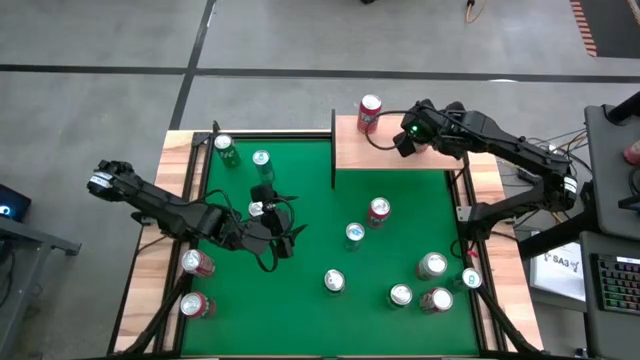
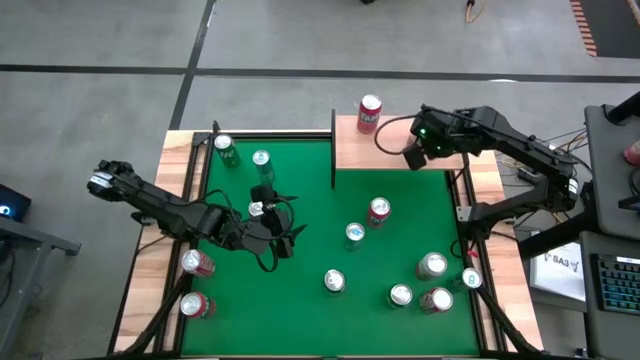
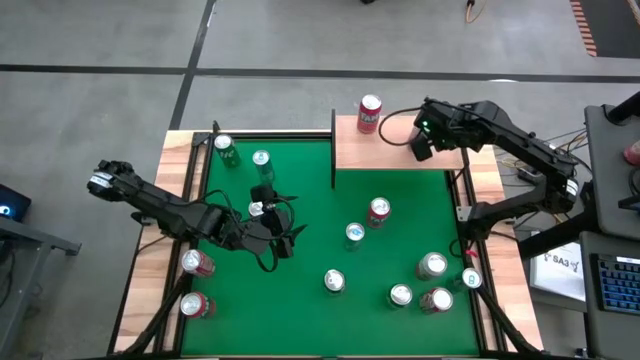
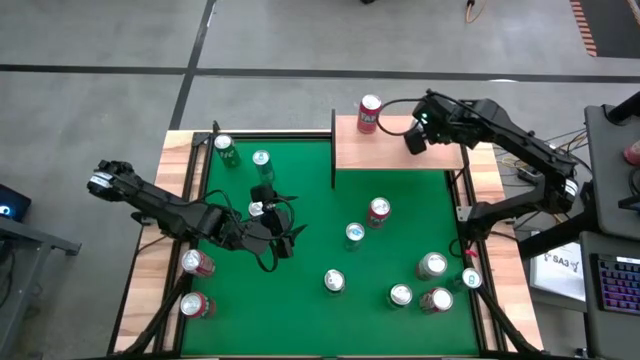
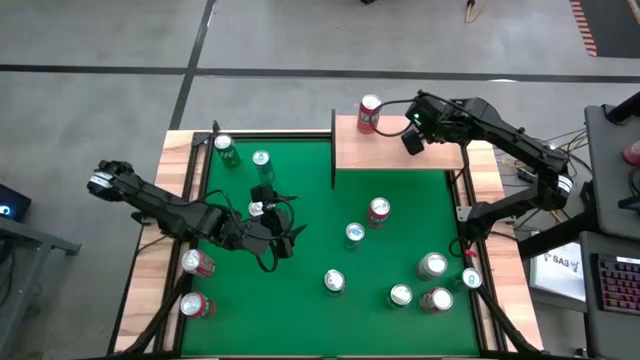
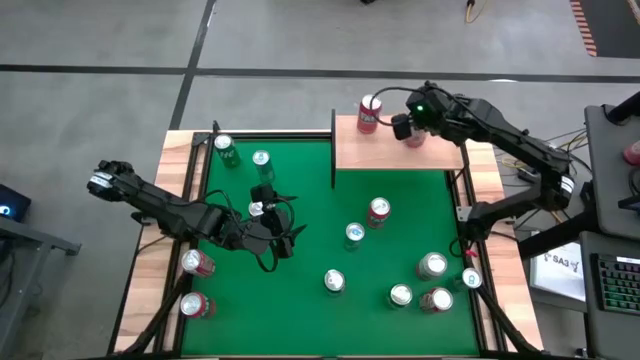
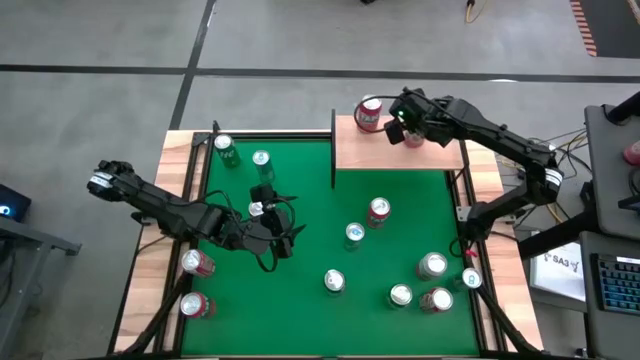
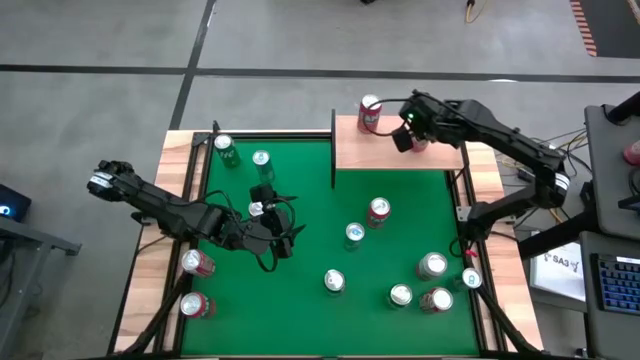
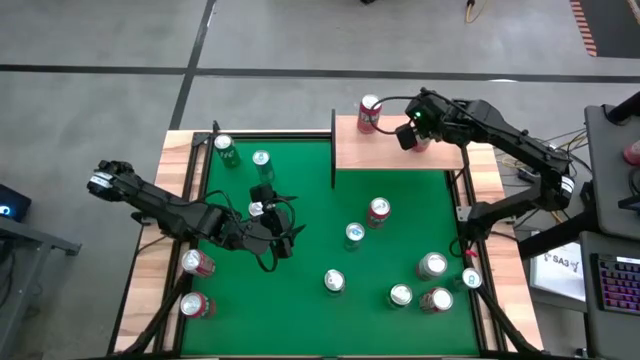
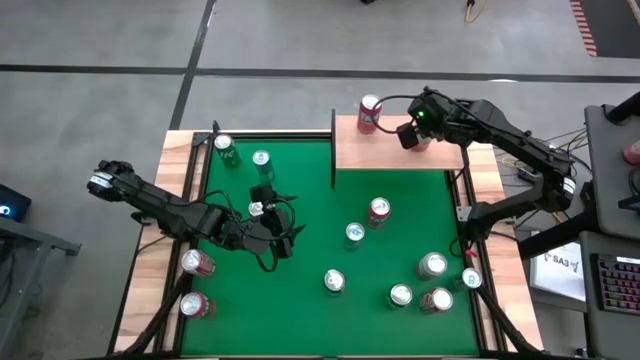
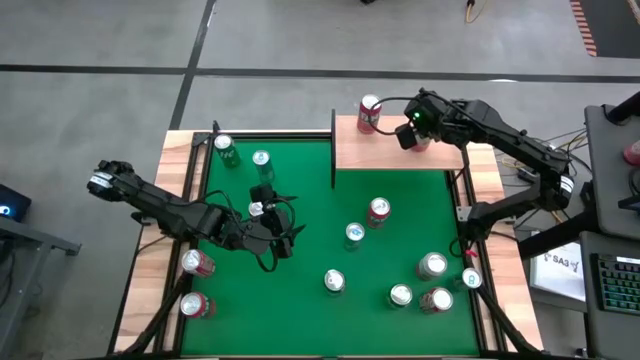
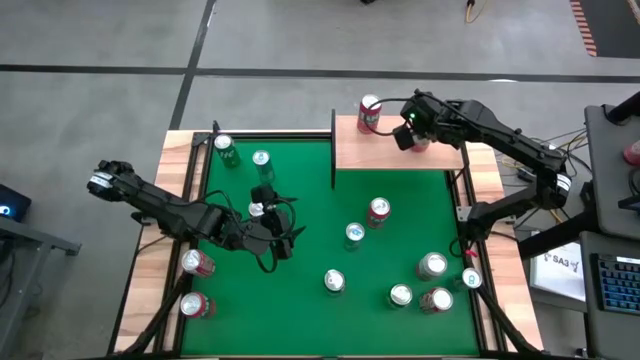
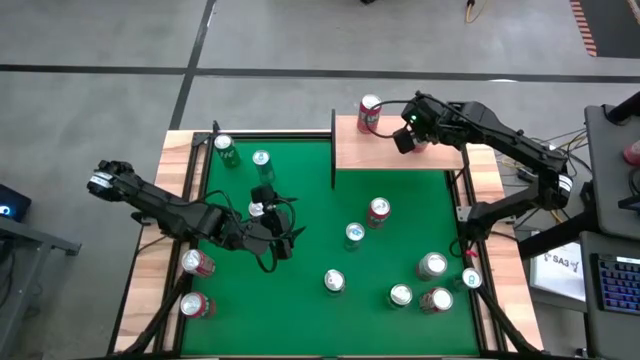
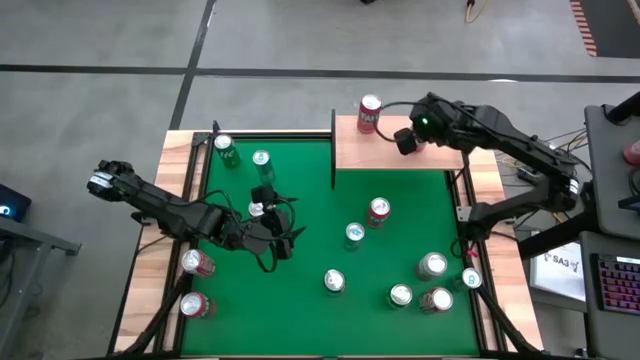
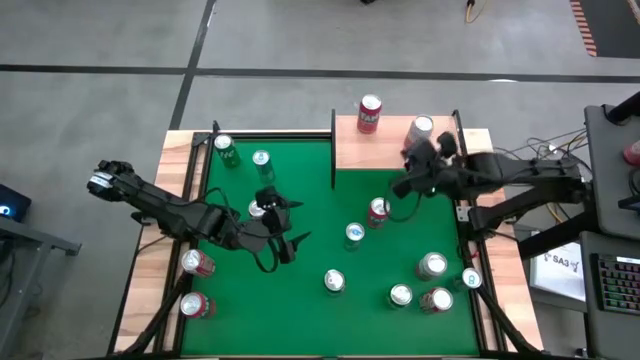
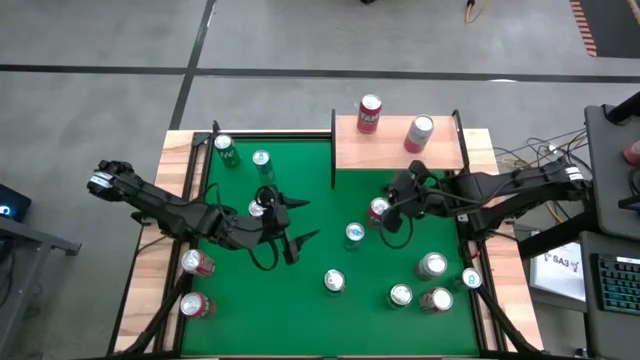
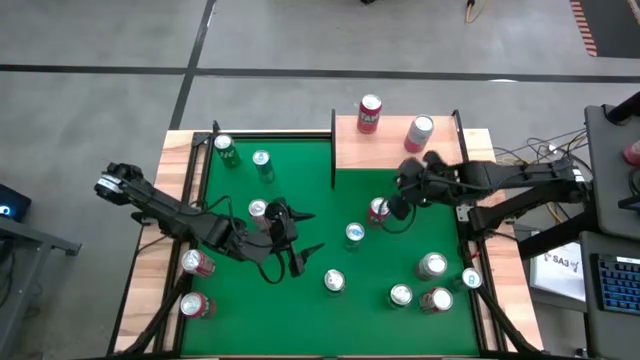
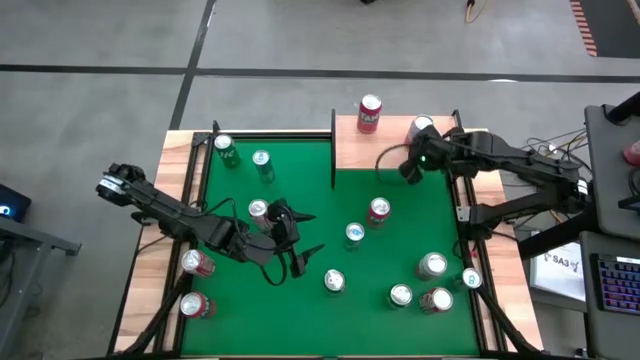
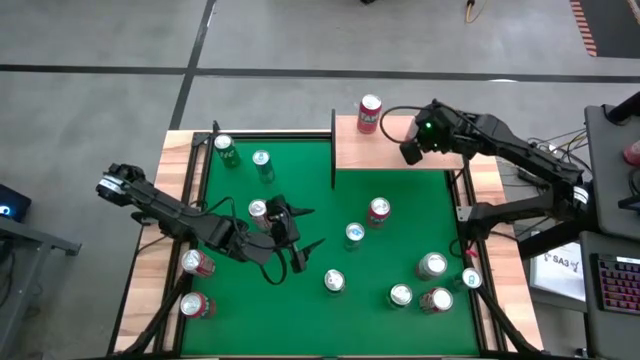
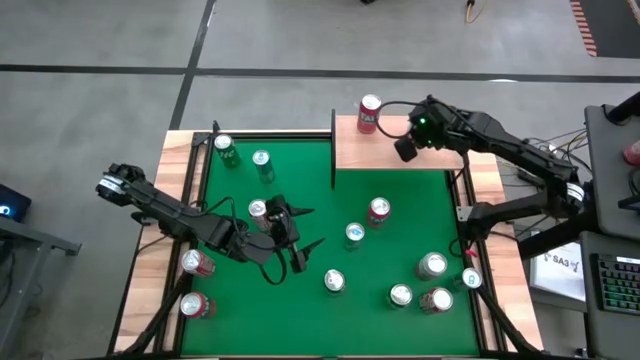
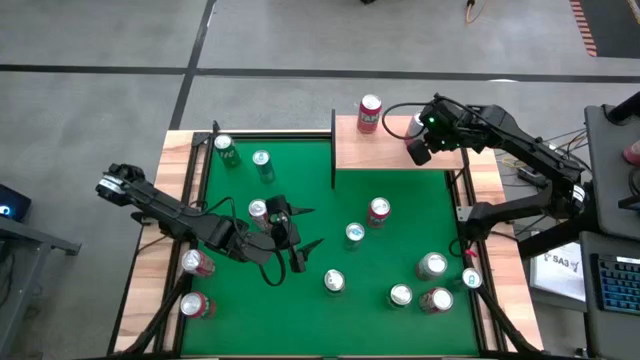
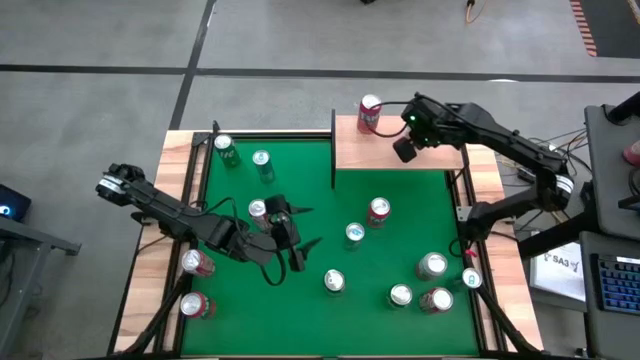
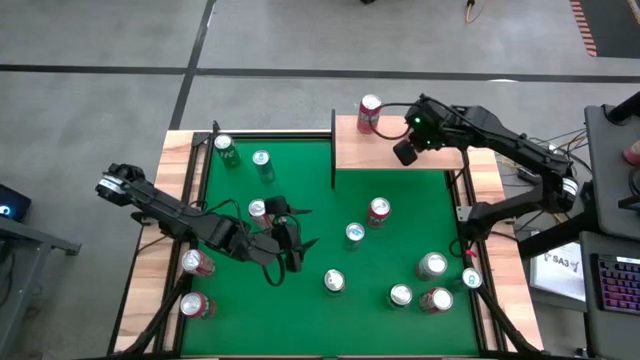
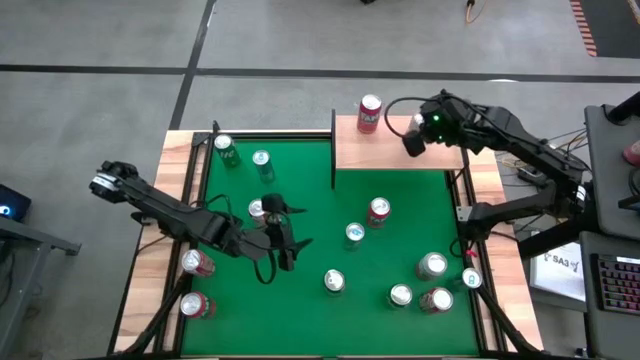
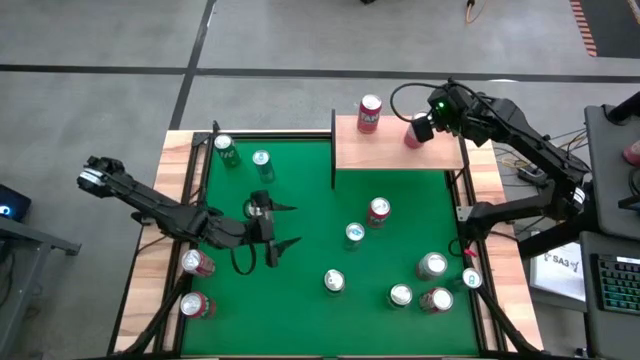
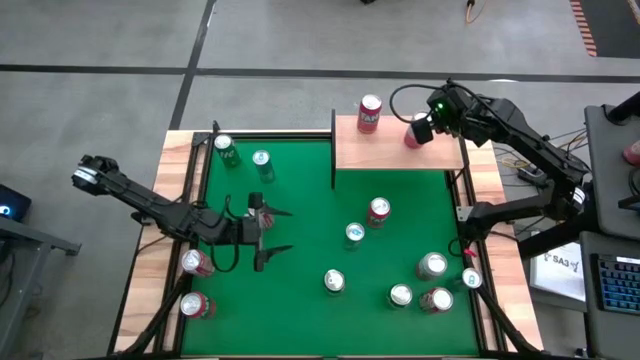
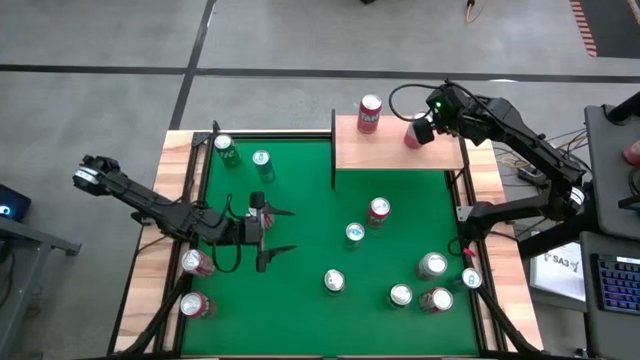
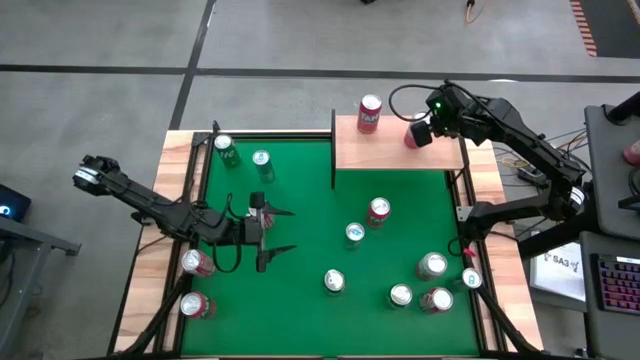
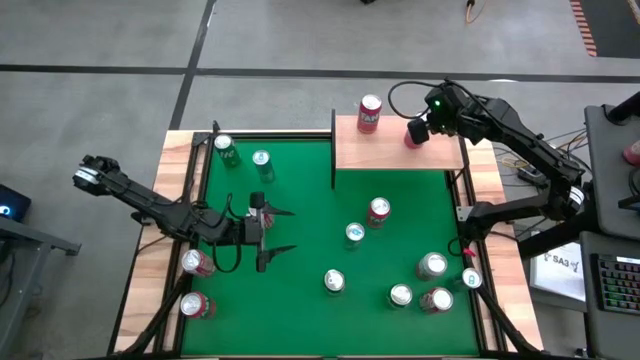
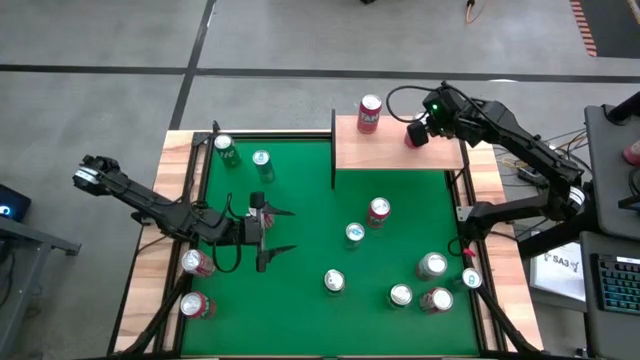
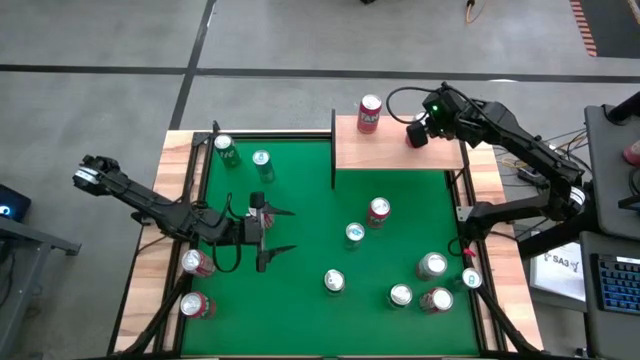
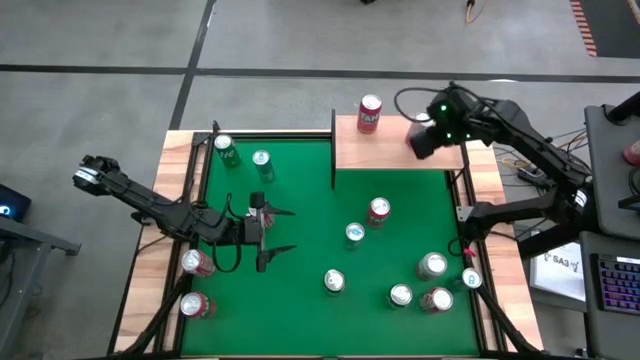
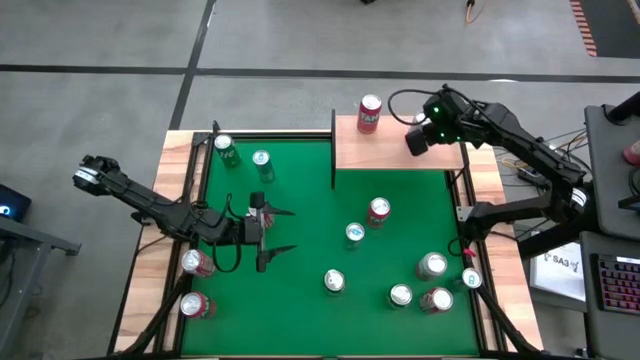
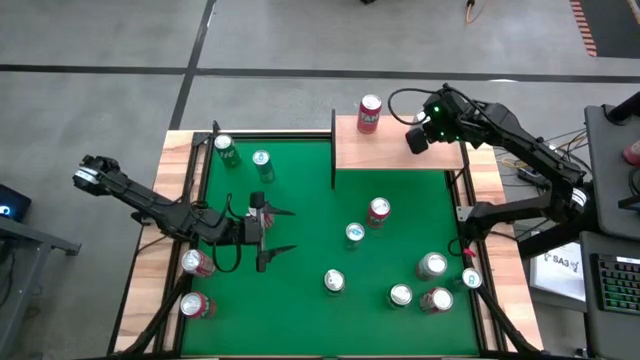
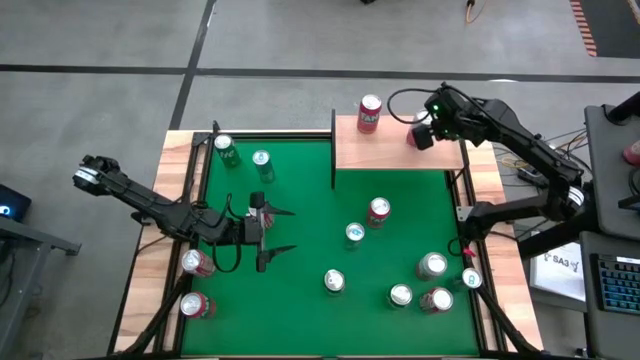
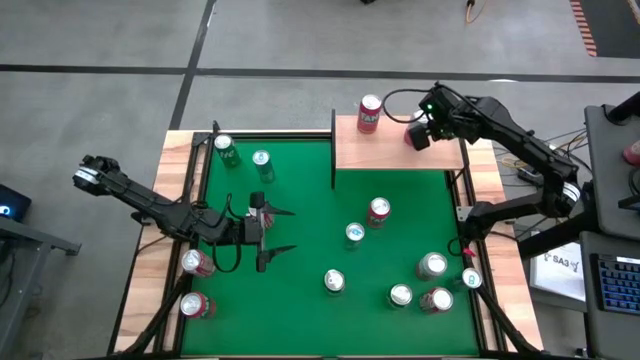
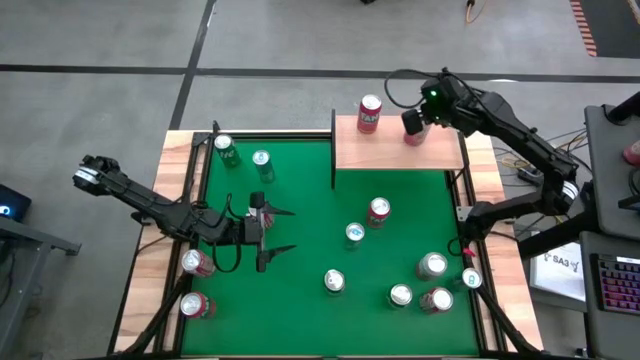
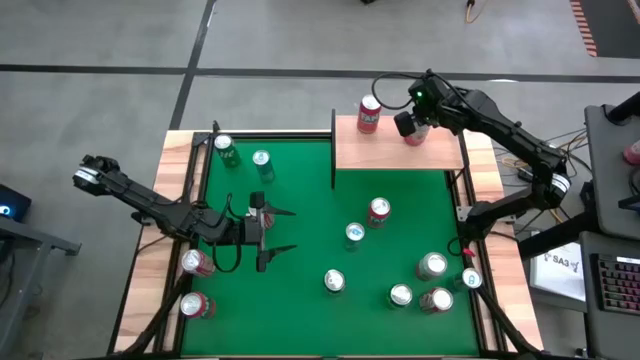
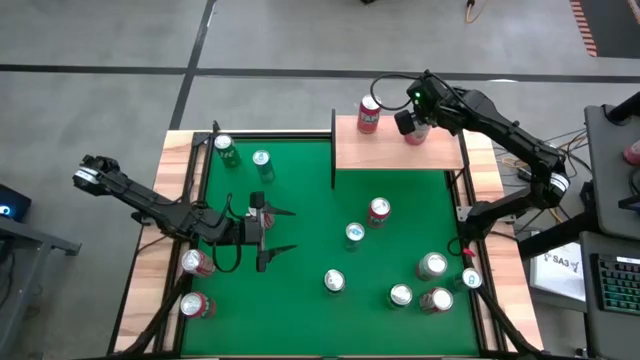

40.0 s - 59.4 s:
Task: Place canned beverage on shelf
Put the left pink-white soda can on the shelf

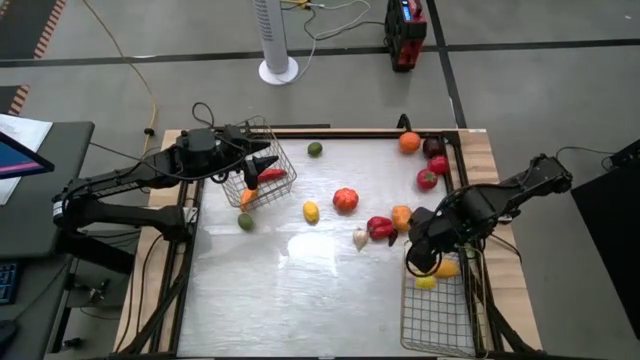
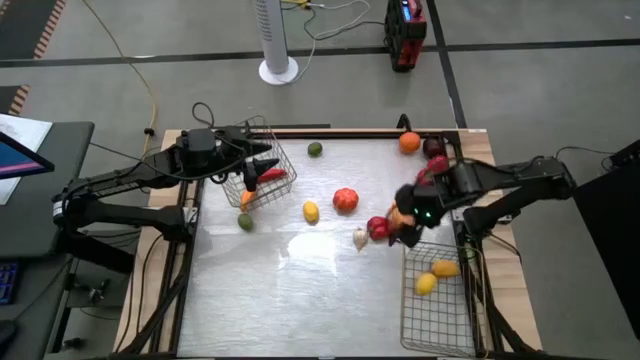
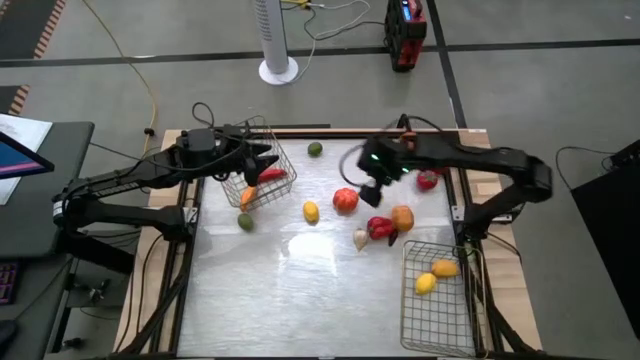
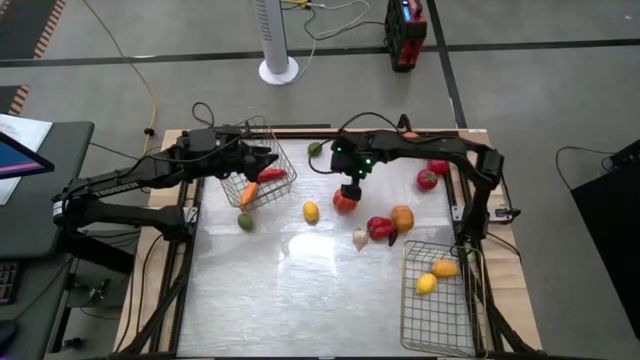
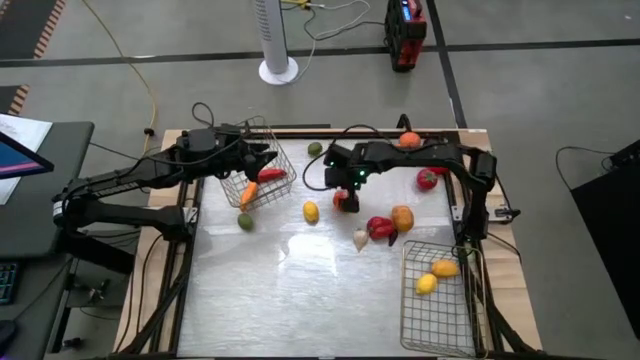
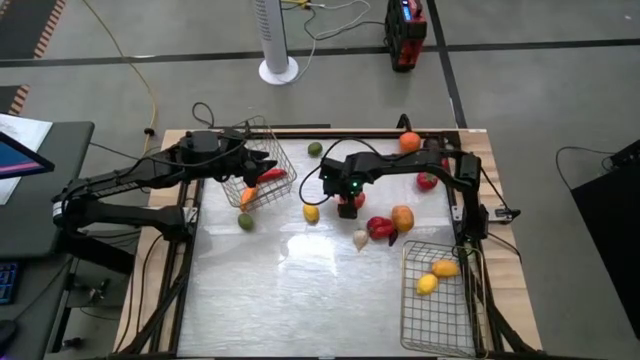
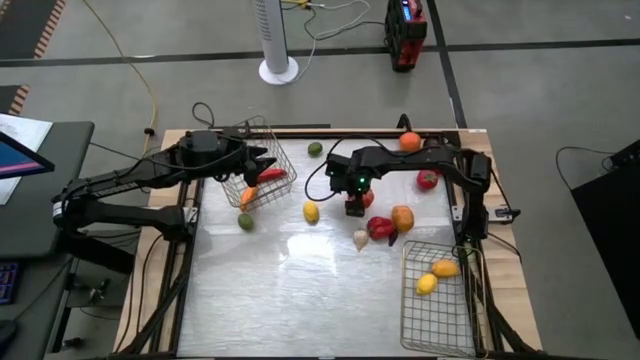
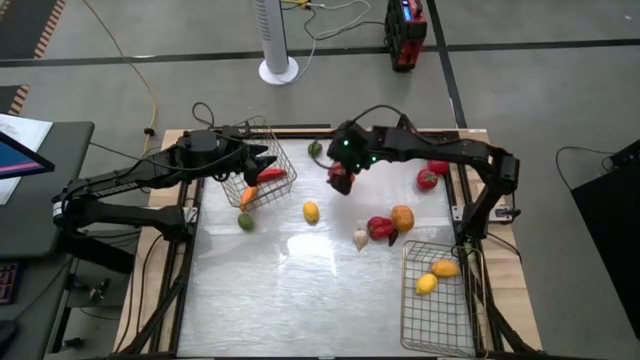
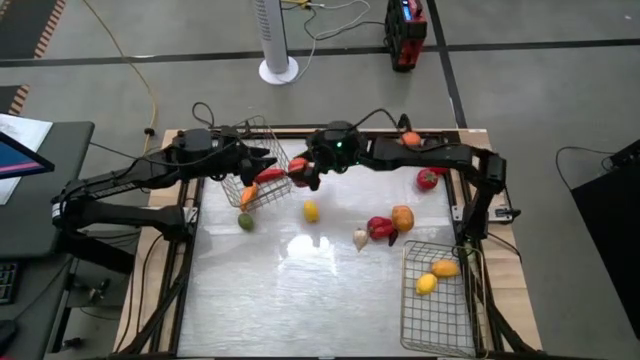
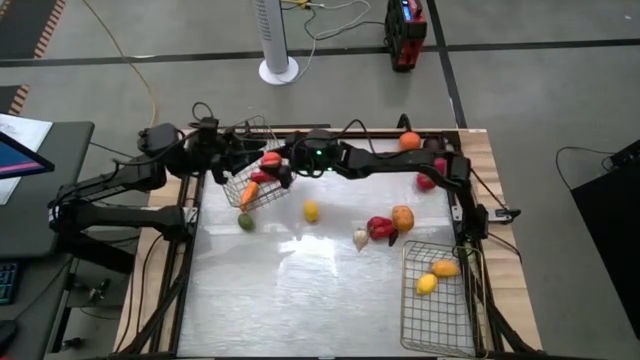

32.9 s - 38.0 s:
Task: Sort produce into baskets
Put the pumpkin into the top wire basket
